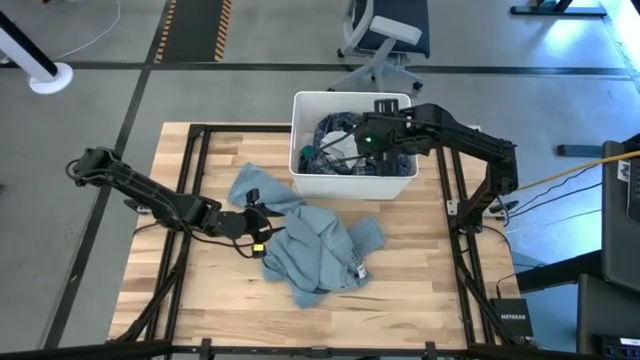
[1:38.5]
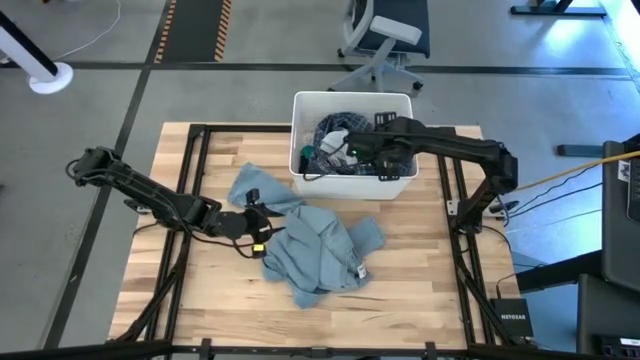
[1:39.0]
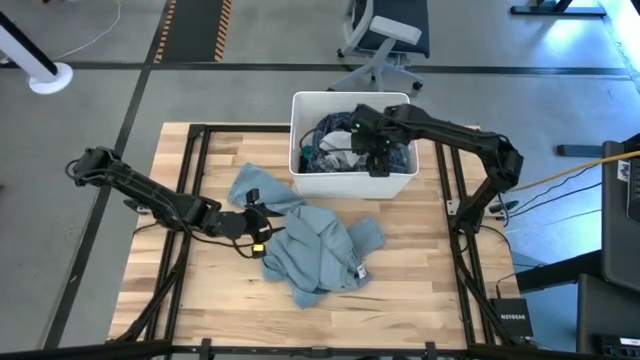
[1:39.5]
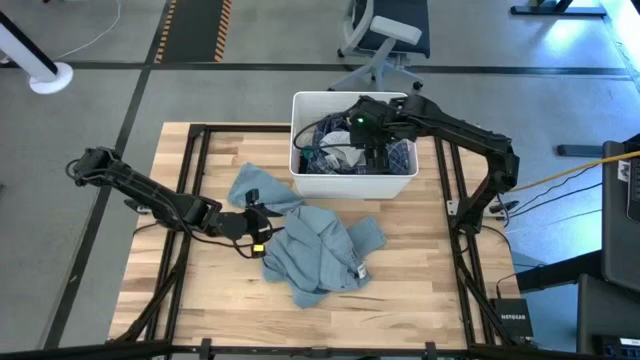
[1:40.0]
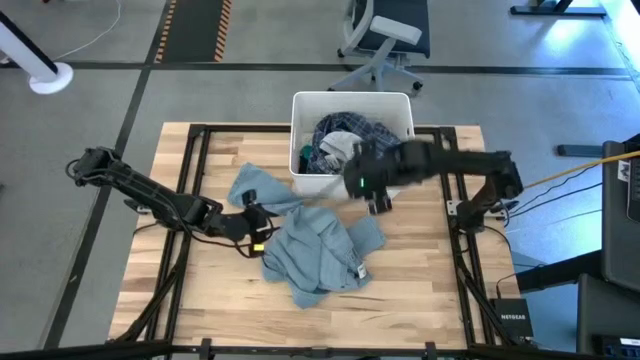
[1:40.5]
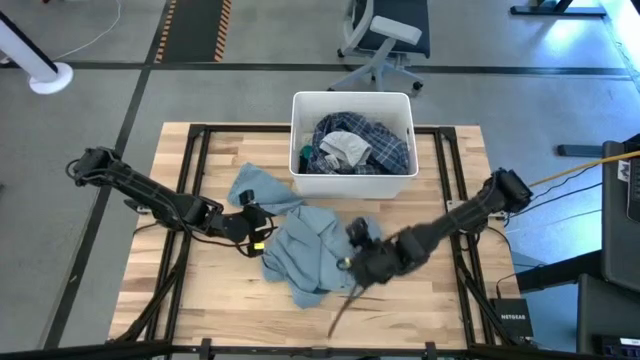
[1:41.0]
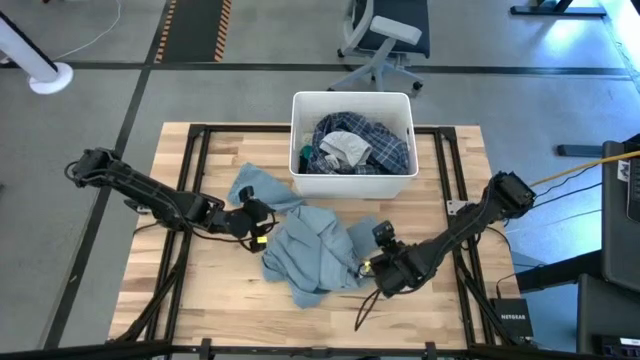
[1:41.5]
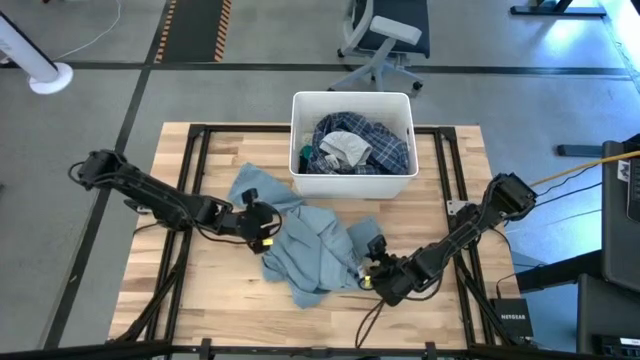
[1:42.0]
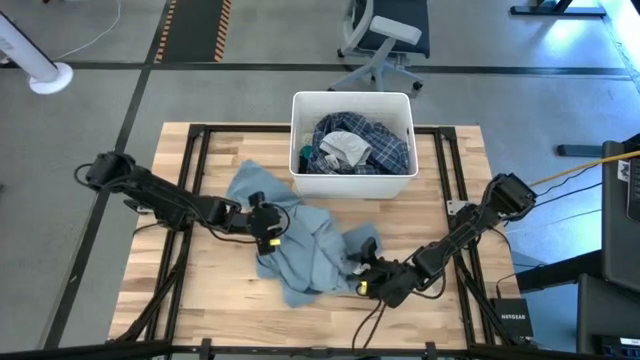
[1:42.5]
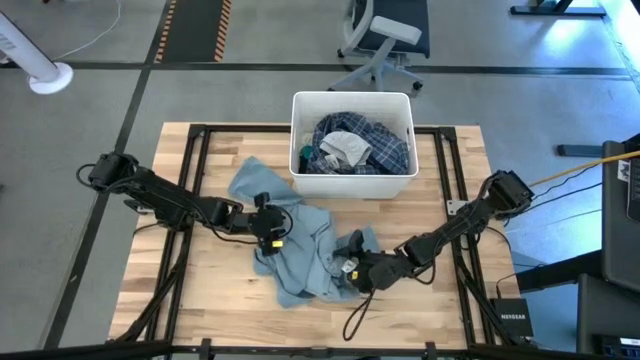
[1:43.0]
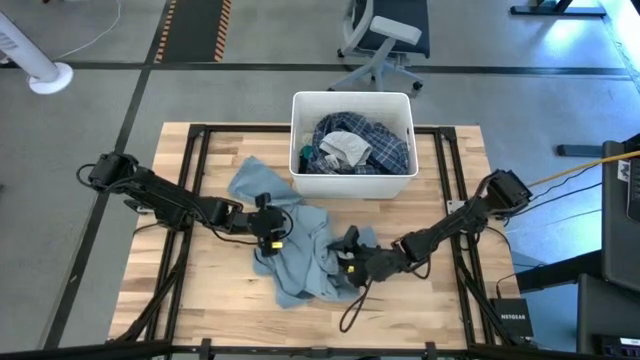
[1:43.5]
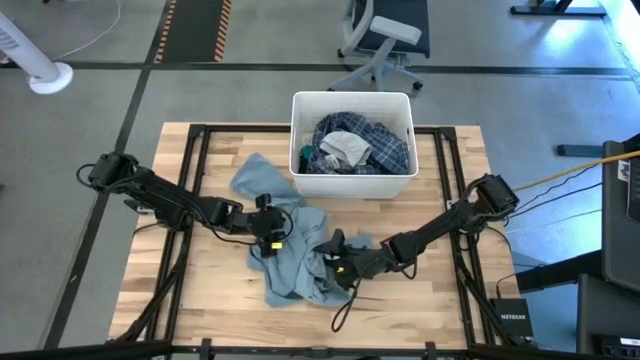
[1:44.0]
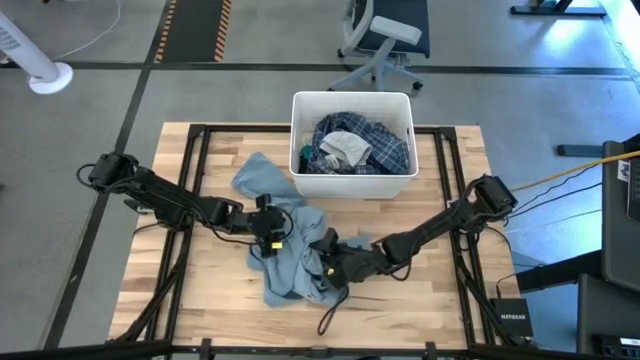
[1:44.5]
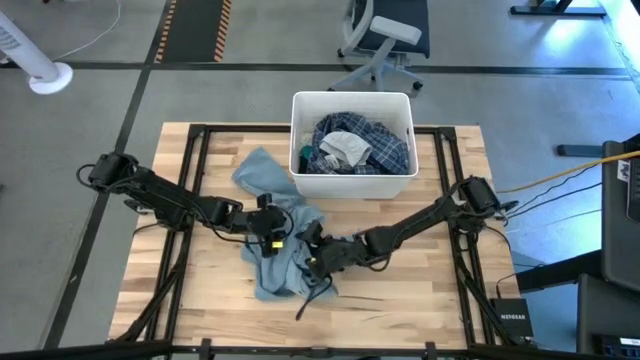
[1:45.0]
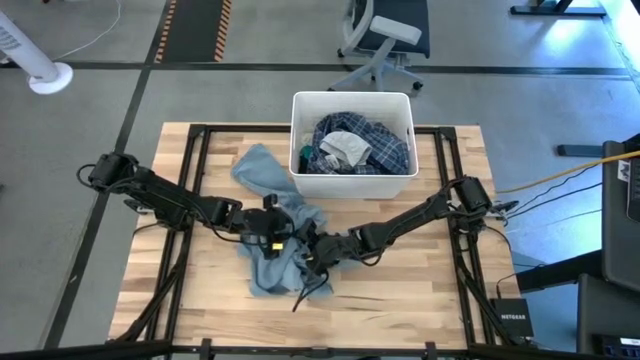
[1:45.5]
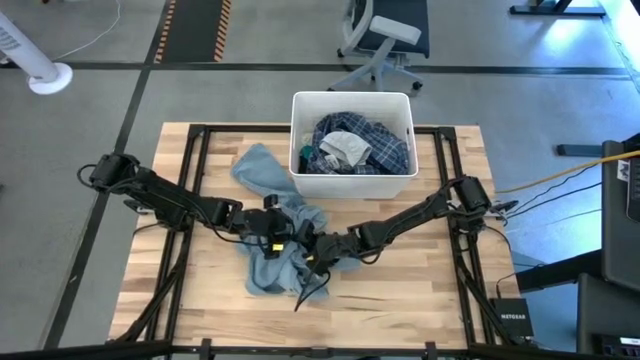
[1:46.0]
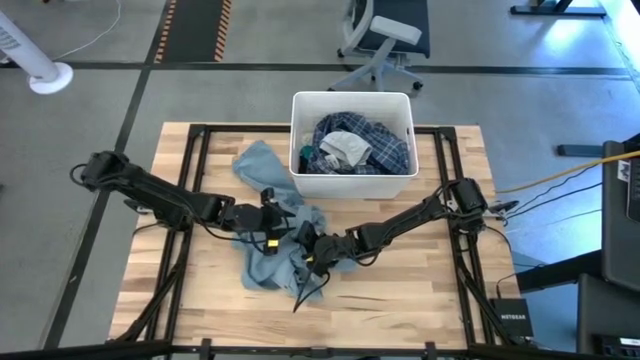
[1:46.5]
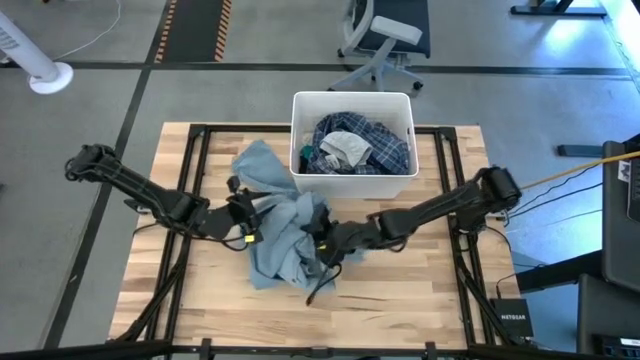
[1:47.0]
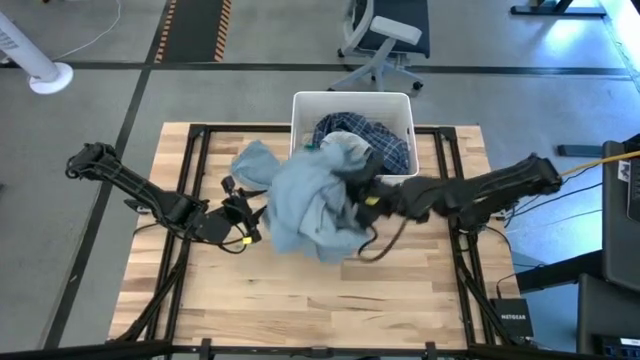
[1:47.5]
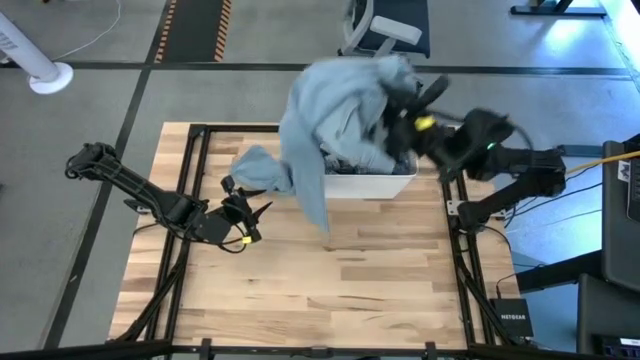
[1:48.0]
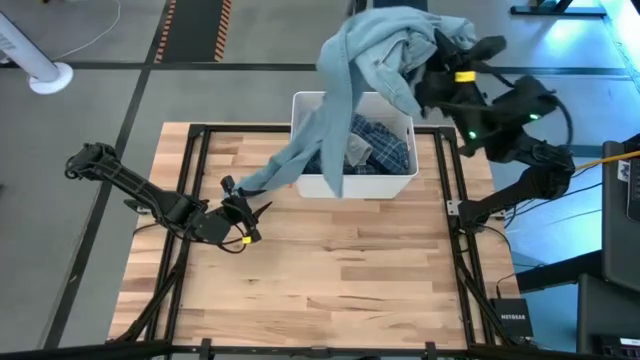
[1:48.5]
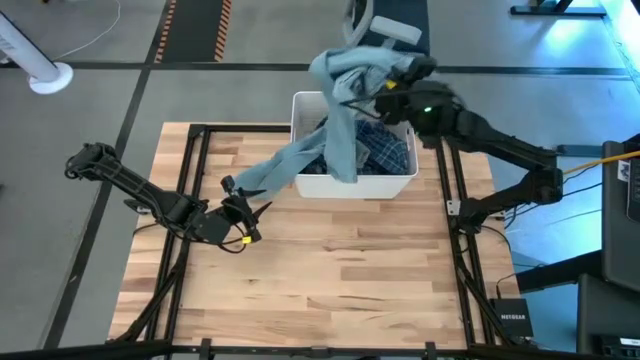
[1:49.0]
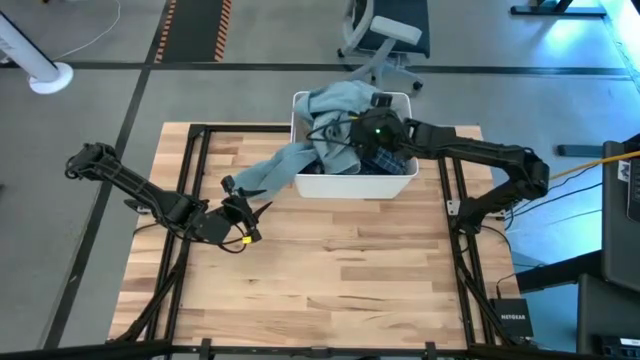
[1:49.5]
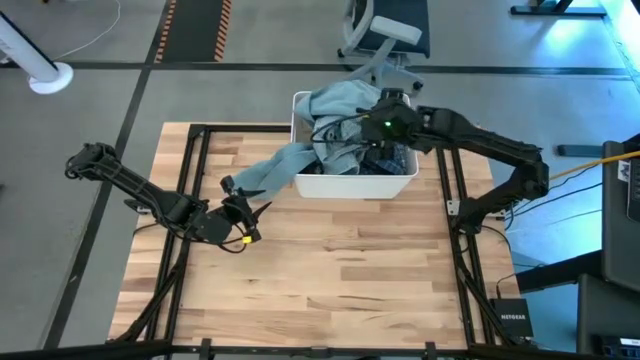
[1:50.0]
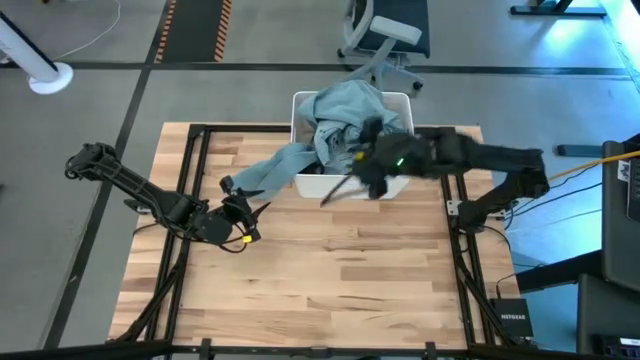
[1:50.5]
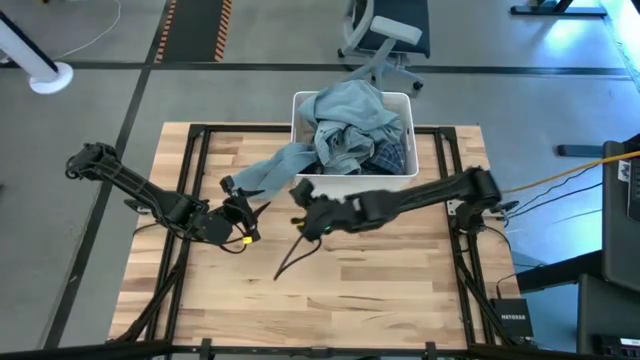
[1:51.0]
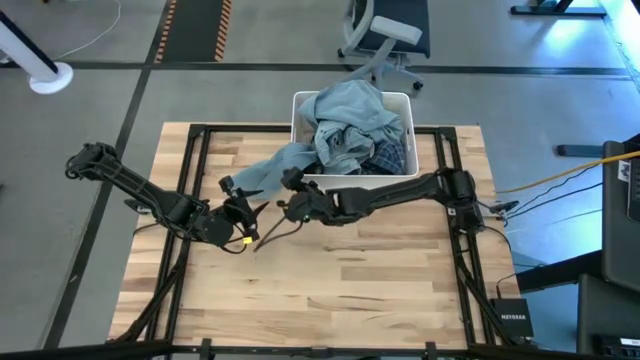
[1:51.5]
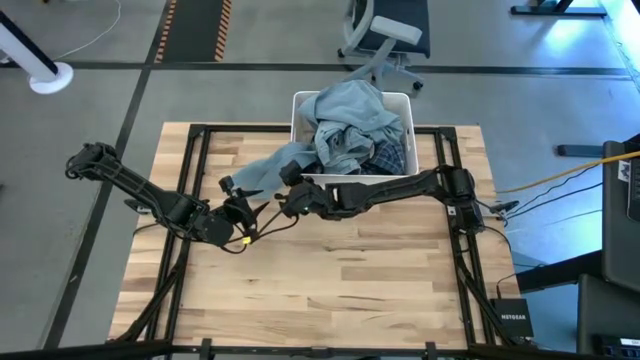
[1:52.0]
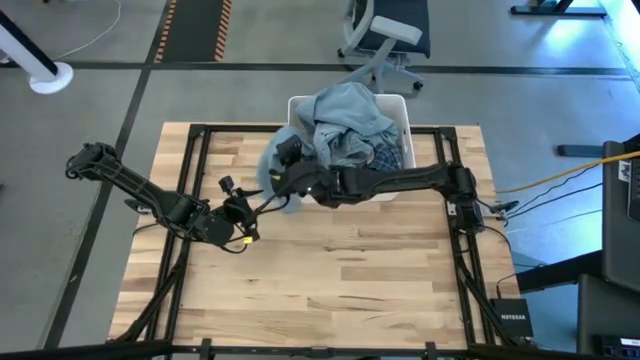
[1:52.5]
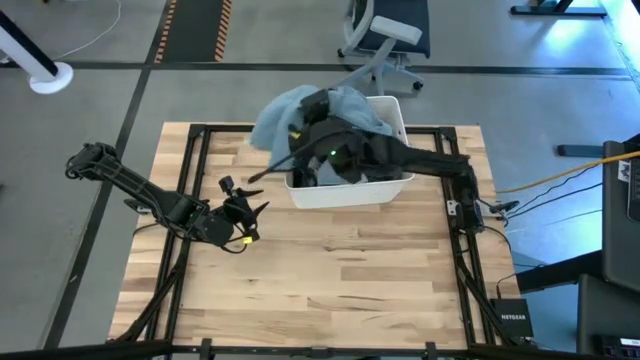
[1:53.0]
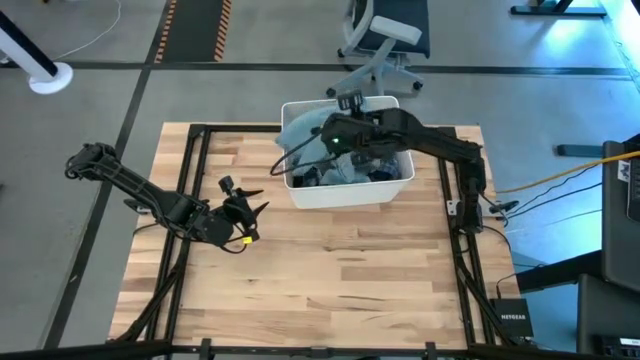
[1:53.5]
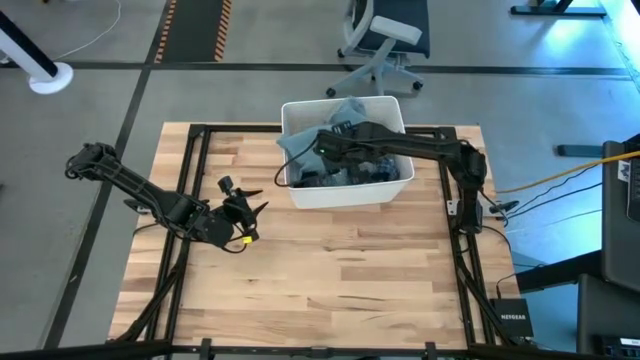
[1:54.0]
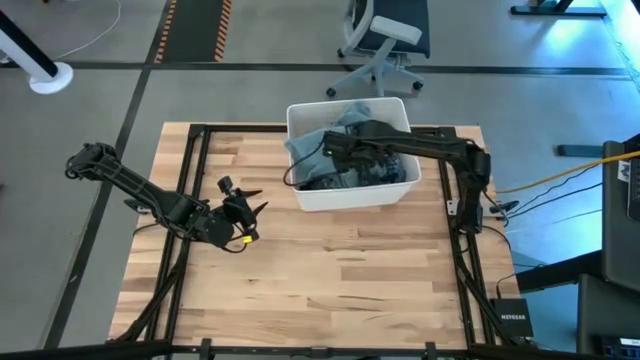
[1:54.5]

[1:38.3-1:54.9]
Task: Sort clothes
Put the blue pants into the white laundry bin

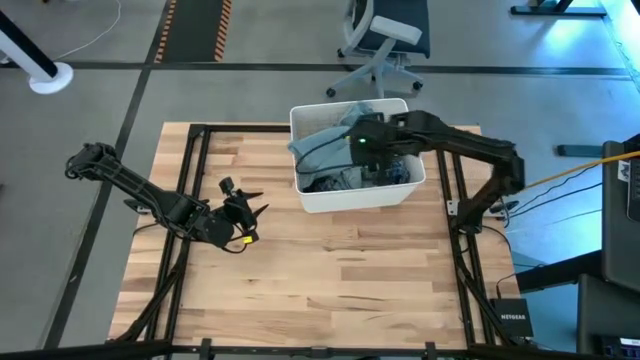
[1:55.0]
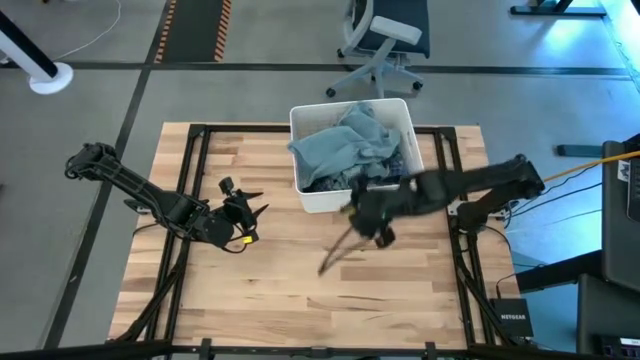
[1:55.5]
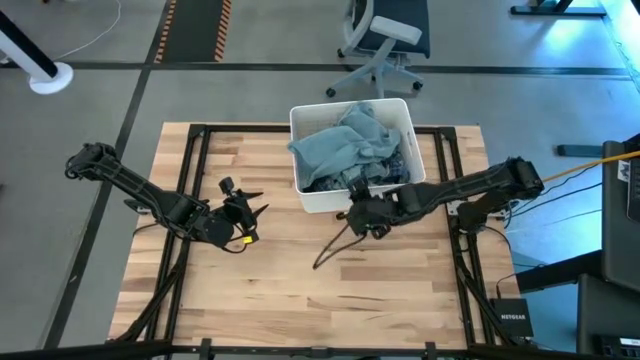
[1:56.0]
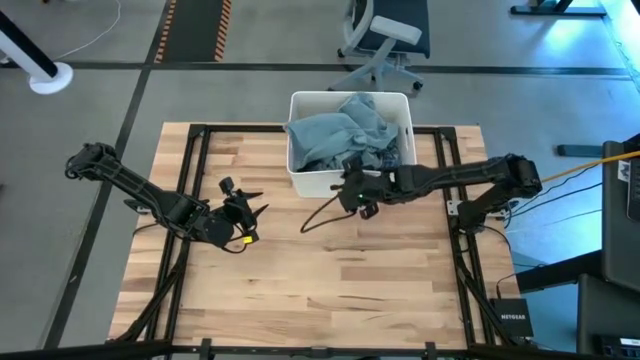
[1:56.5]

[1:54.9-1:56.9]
Adjust the white laundry bin

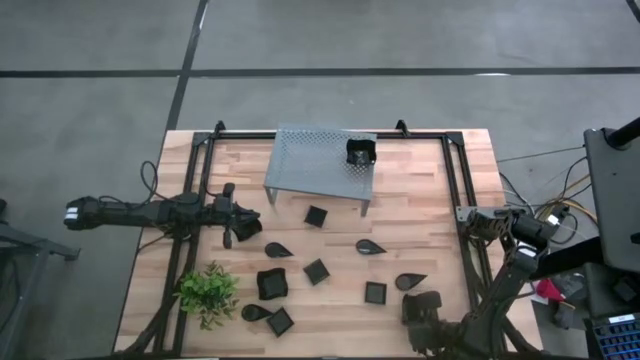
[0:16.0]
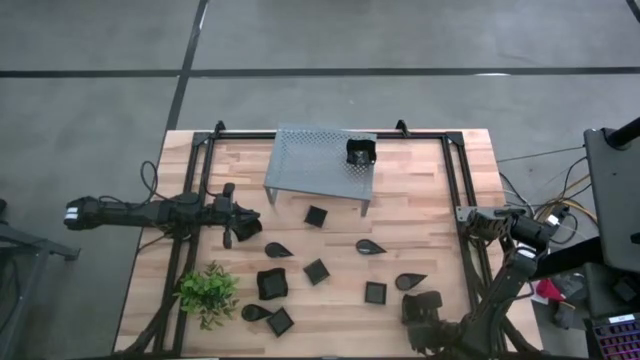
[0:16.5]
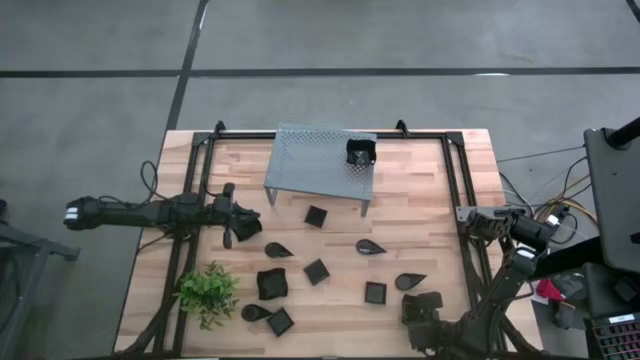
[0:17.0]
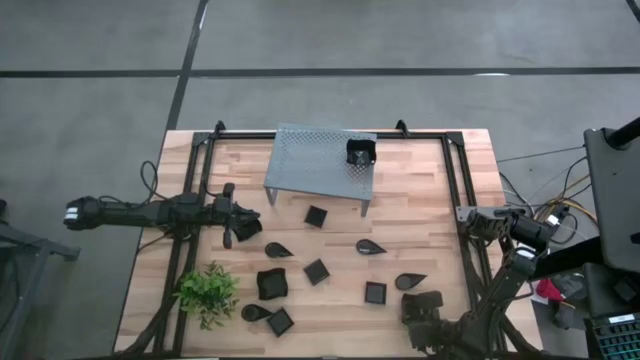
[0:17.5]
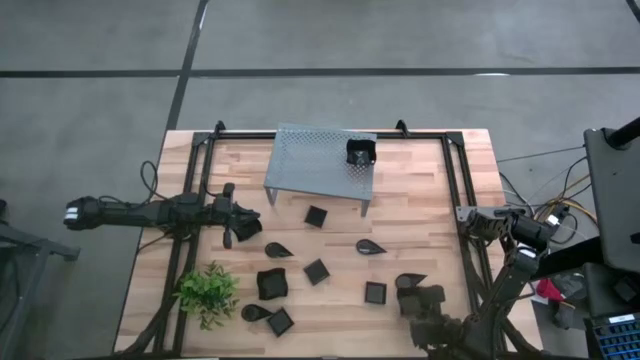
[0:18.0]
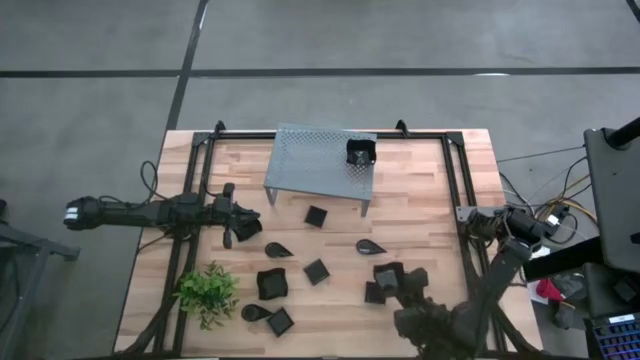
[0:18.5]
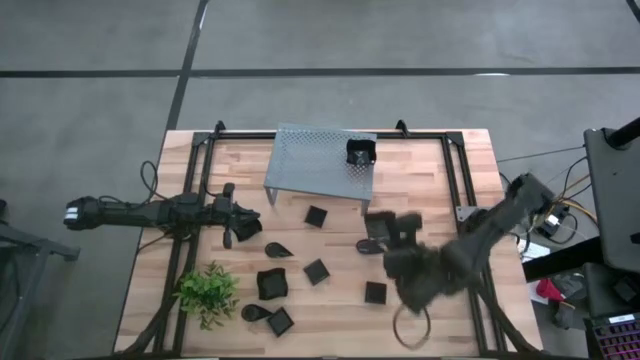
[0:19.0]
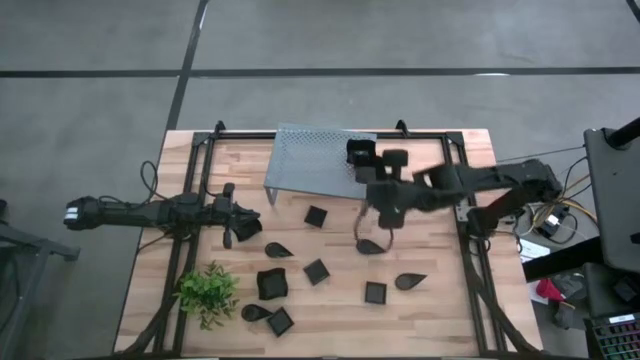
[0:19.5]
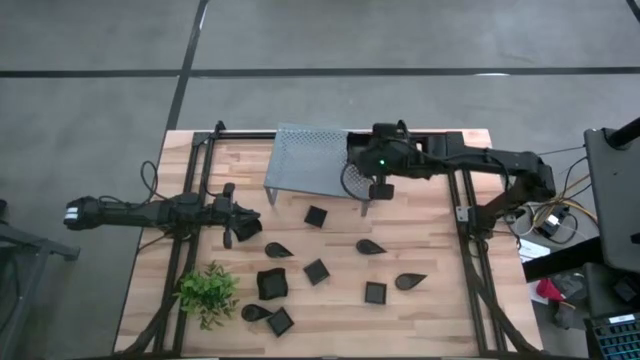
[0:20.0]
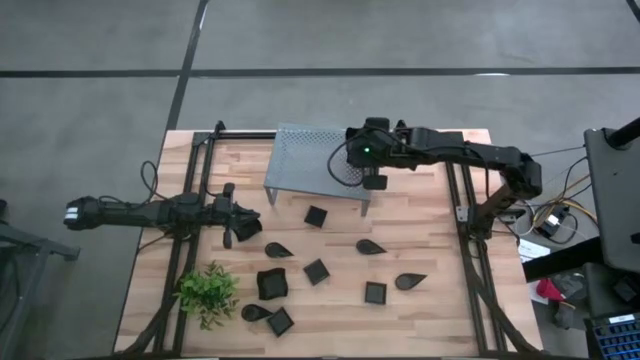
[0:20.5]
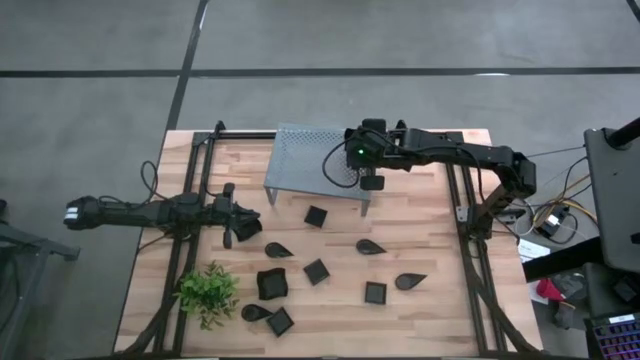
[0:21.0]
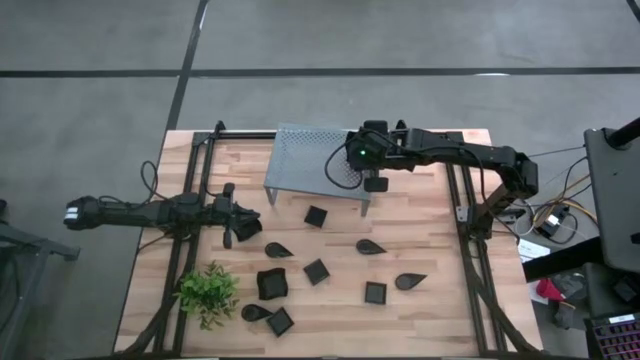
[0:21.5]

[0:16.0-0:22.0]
Task: Pick & Place Mini shaped plates
Stack the black distorted square plate on top of the other black distorted square plate on the shelf
